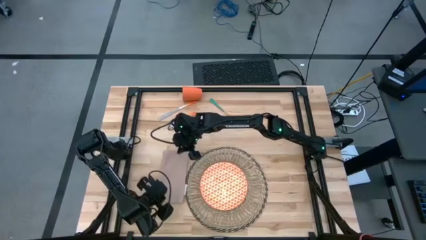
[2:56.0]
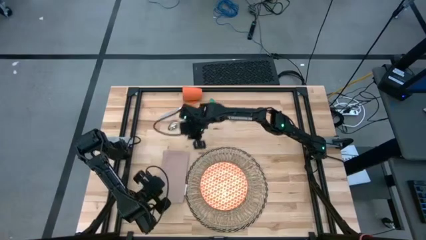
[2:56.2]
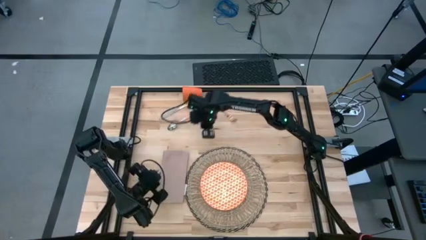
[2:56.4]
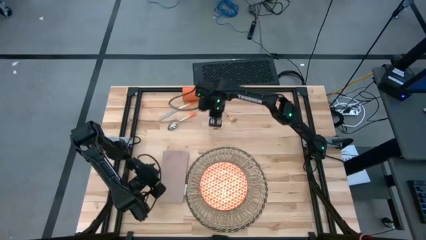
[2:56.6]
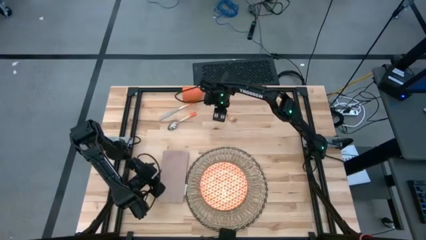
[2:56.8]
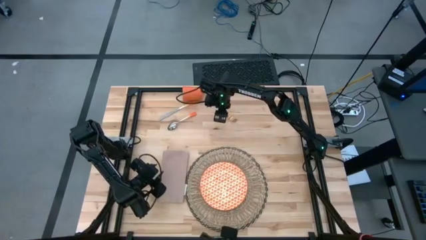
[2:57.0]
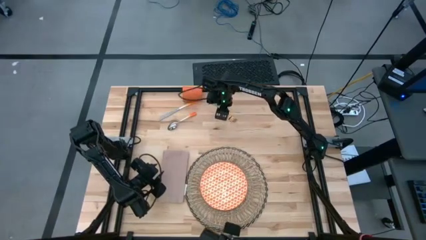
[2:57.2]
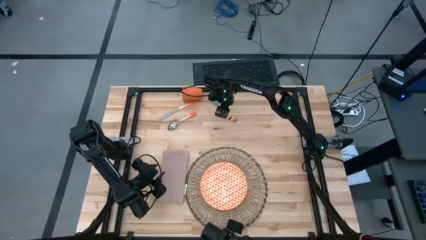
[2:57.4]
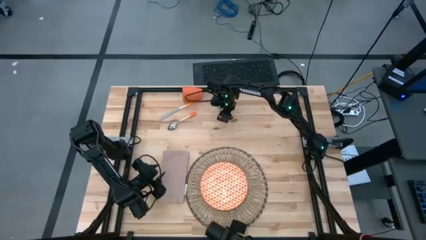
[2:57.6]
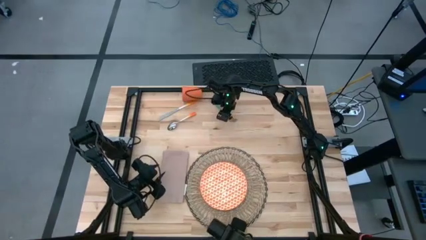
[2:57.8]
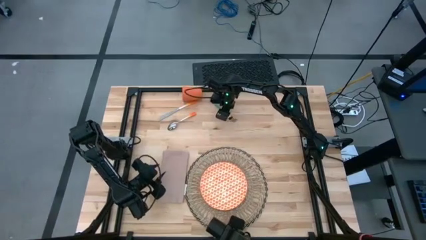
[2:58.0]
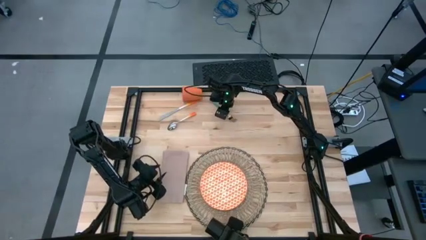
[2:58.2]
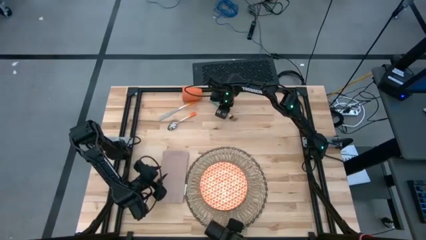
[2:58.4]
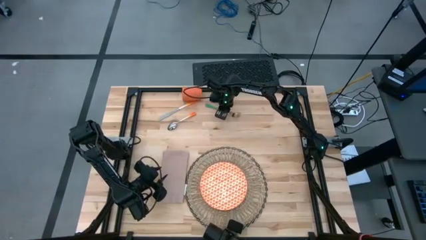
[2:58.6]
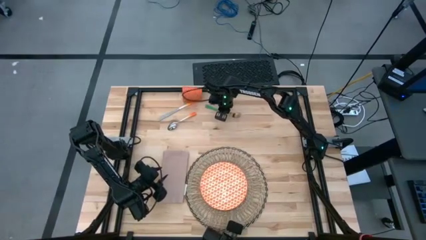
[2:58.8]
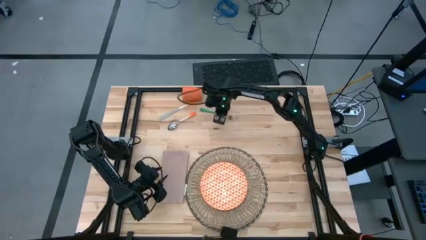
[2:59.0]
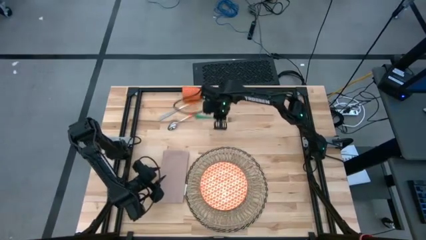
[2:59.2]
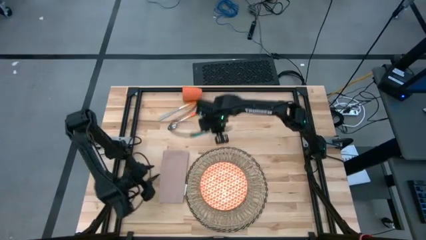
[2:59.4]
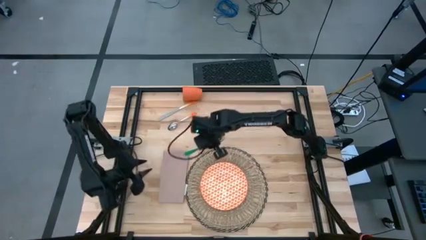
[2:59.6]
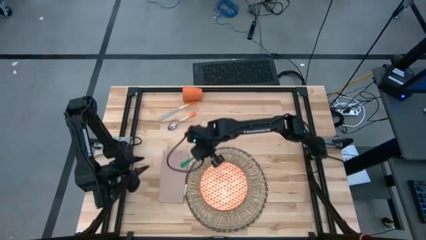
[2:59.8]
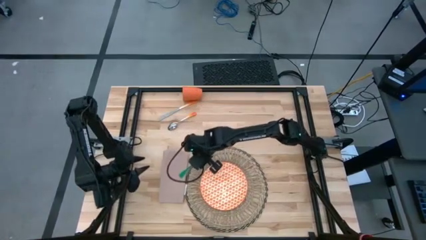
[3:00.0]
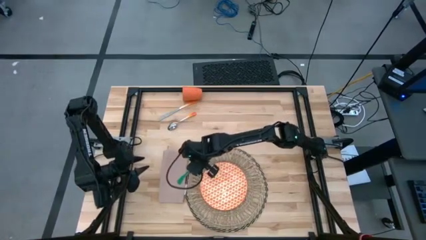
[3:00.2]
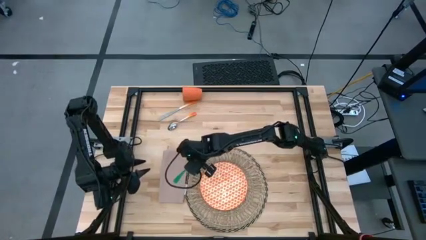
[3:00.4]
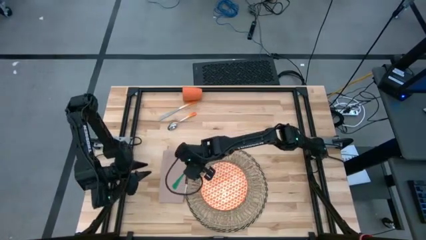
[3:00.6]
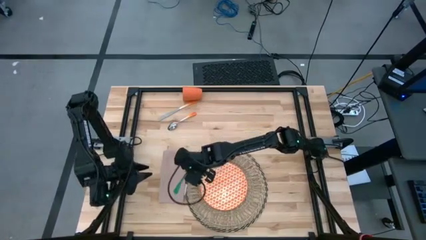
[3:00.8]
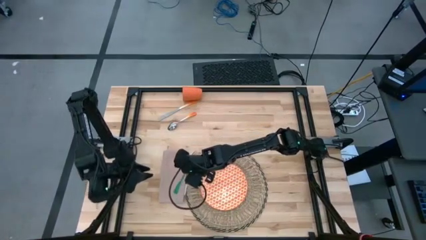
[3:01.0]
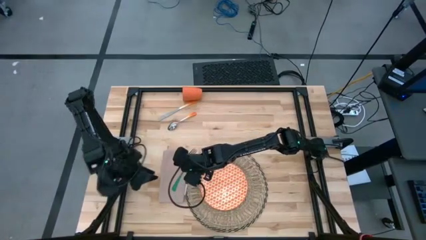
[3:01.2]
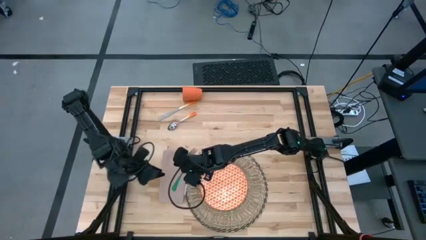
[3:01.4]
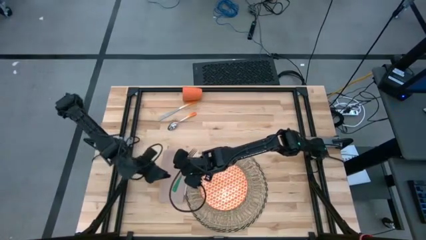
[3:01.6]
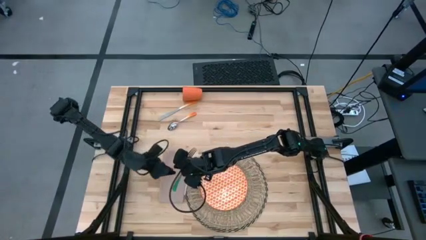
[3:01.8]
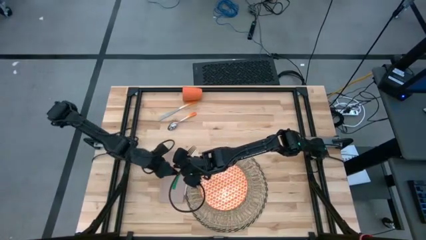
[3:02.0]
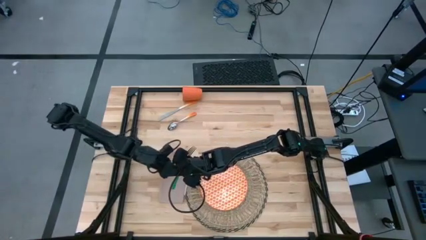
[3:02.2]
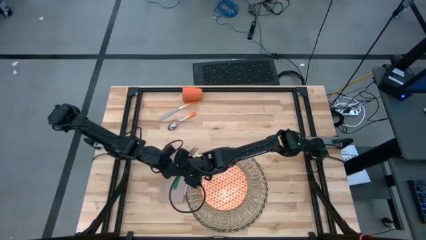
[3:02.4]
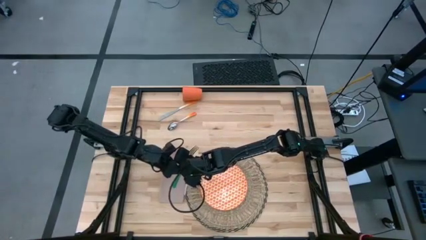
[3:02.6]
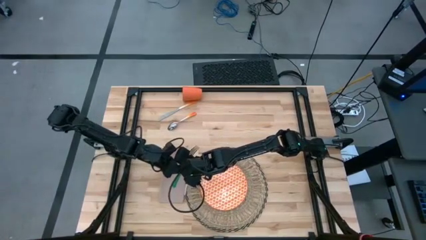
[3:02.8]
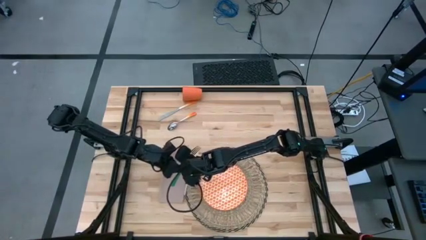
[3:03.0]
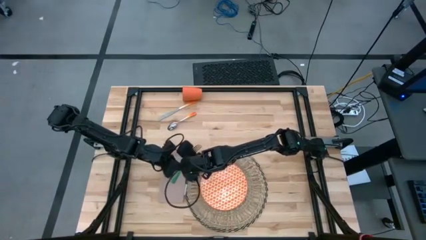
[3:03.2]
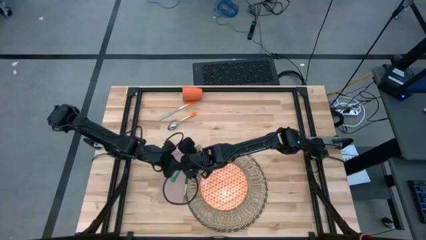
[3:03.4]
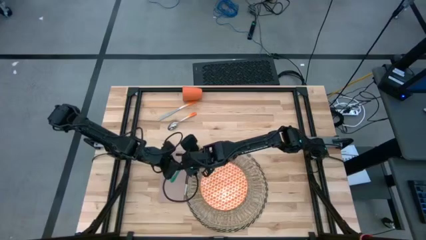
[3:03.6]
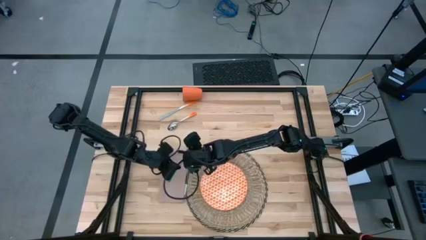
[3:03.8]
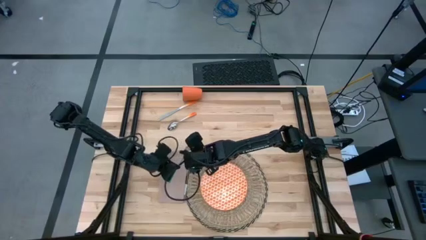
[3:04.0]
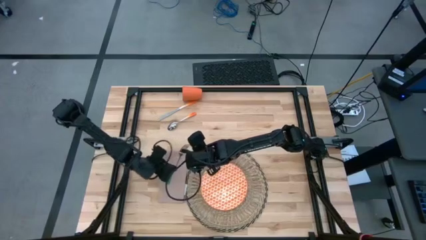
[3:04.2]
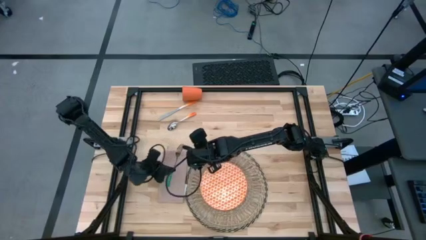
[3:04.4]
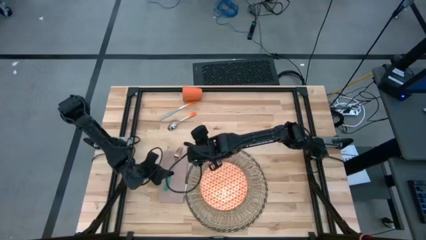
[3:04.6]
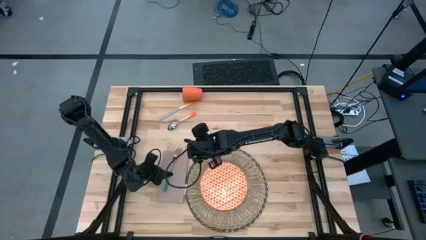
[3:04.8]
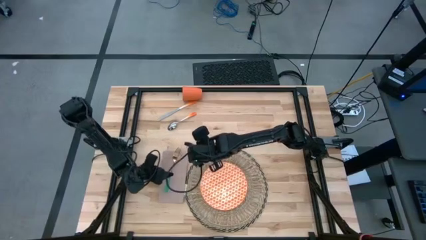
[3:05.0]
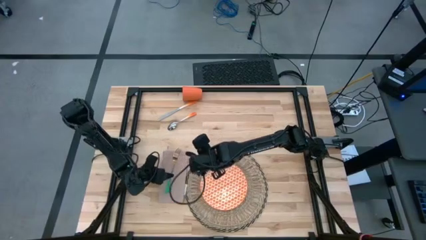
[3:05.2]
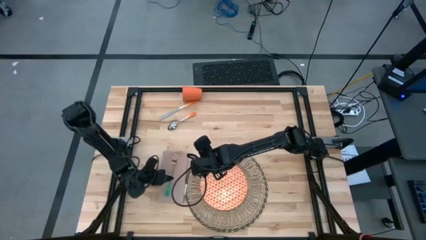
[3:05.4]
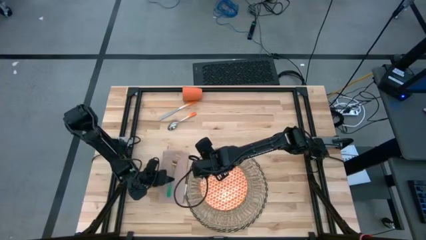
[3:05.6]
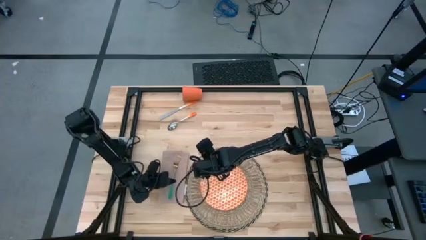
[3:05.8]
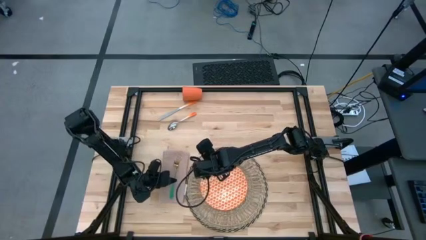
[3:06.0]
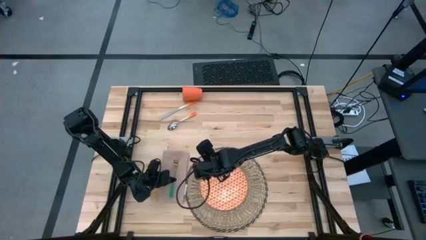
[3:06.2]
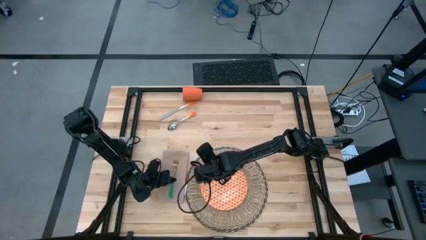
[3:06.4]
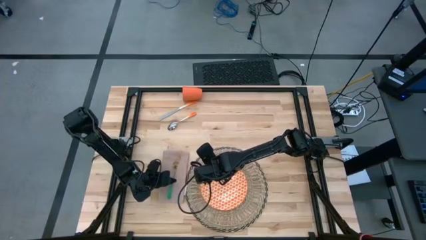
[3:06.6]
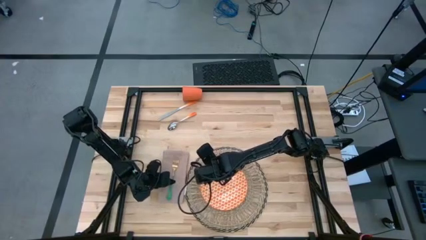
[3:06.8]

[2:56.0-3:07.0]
Task: Set table place
Put the fork on the napkin to the left of the mat

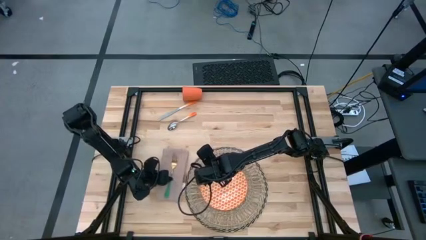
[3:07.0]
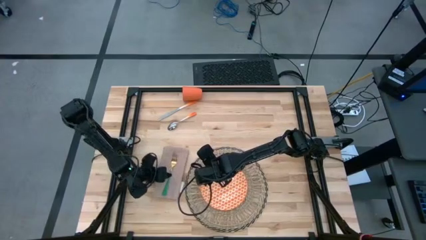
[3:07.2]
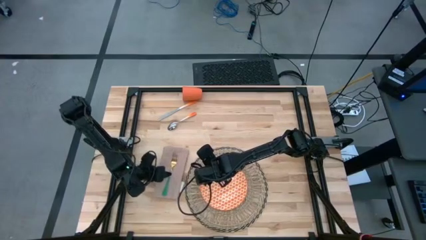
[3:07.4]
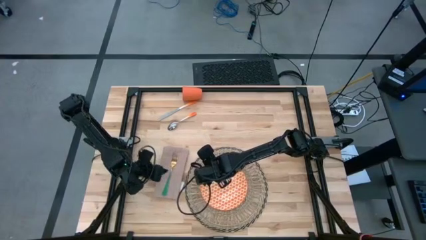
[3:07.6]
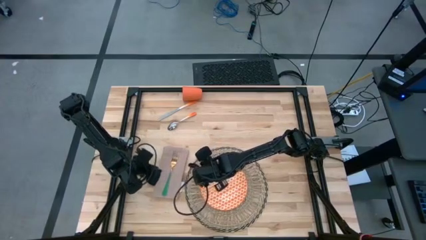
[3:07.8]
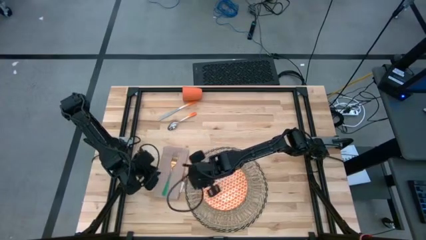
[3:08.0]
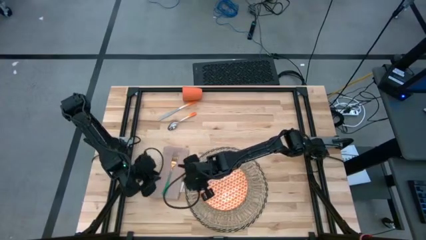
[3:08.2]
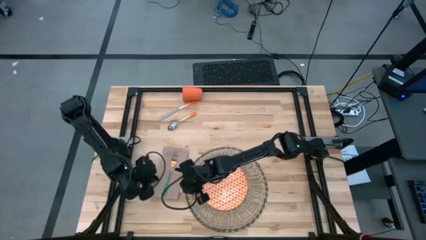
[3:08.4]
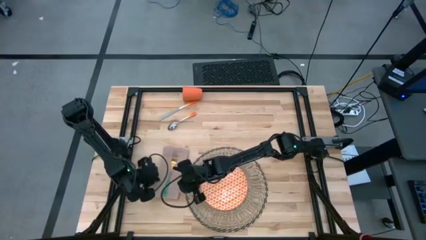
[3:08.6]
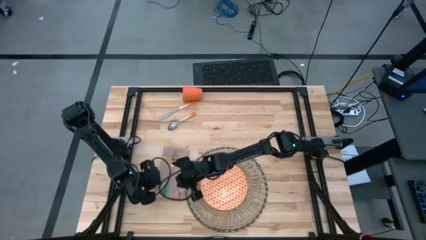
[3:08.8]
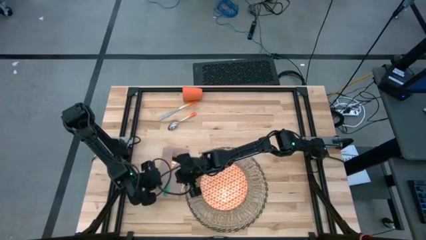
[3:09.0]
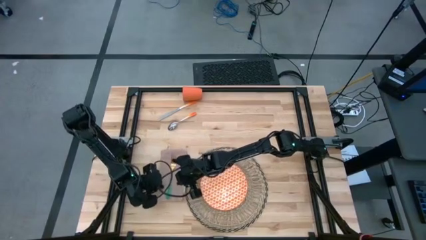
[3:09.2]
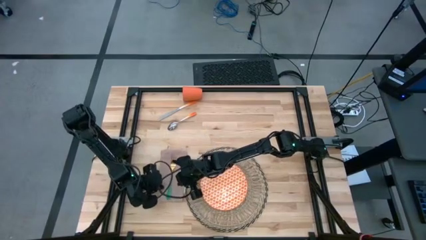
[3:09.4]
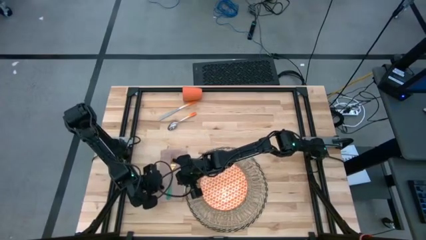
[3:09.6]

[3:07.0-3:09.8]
Adjust the napkin

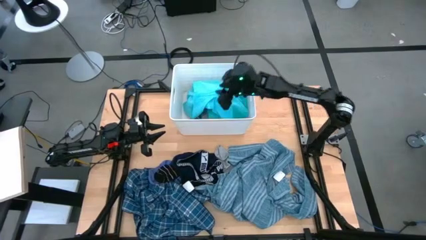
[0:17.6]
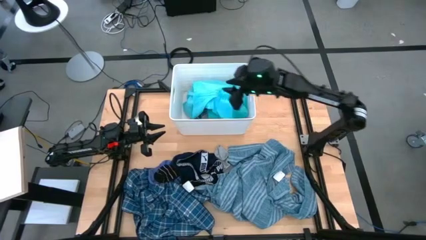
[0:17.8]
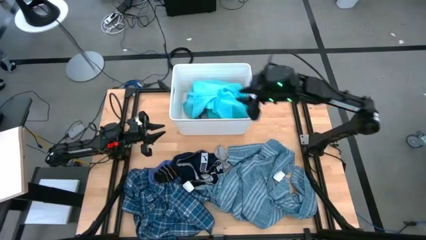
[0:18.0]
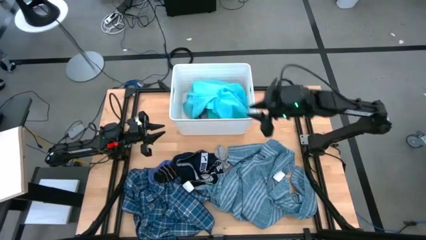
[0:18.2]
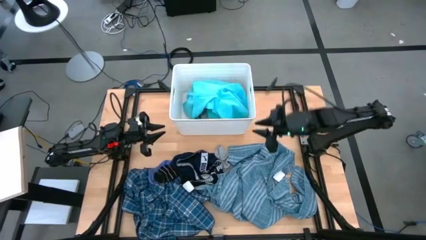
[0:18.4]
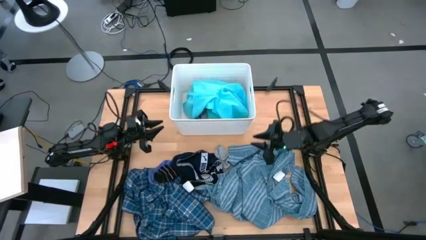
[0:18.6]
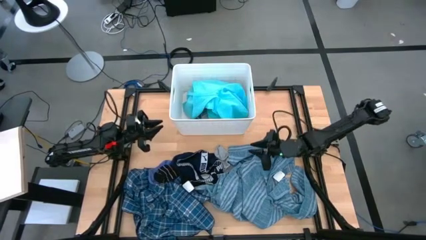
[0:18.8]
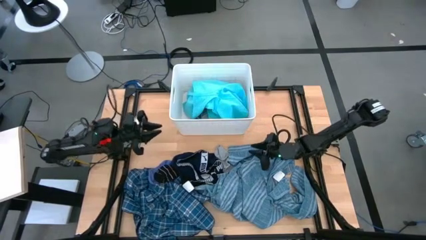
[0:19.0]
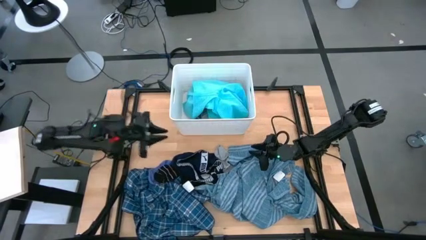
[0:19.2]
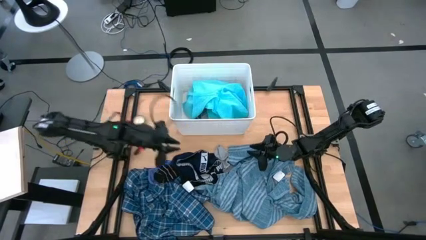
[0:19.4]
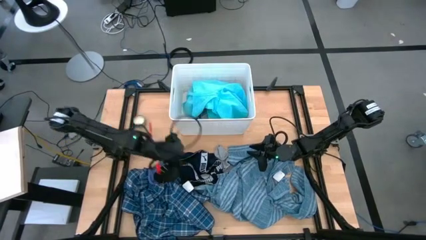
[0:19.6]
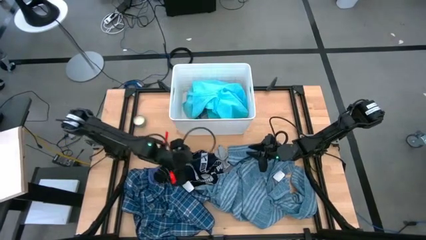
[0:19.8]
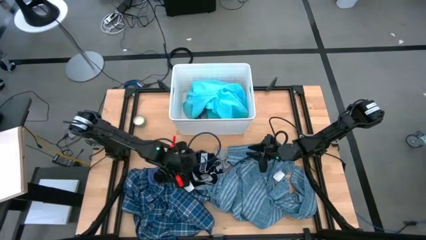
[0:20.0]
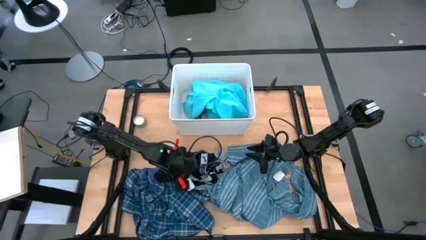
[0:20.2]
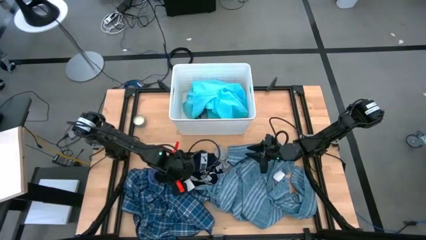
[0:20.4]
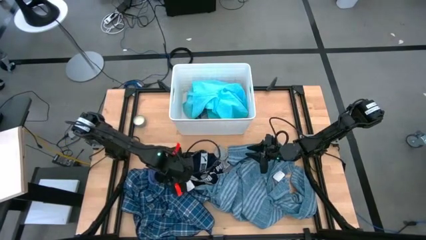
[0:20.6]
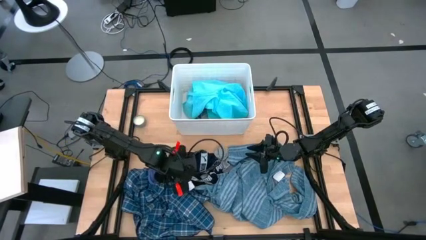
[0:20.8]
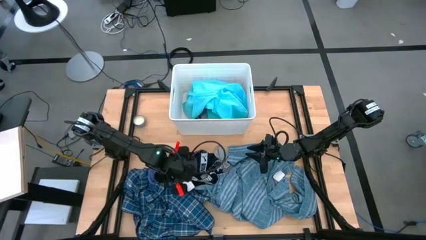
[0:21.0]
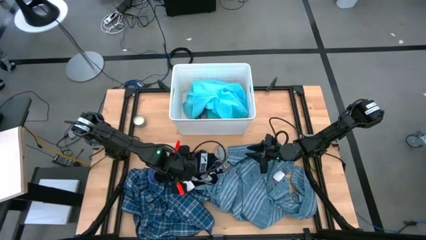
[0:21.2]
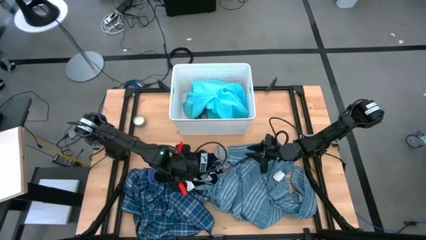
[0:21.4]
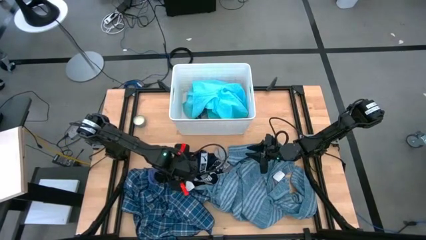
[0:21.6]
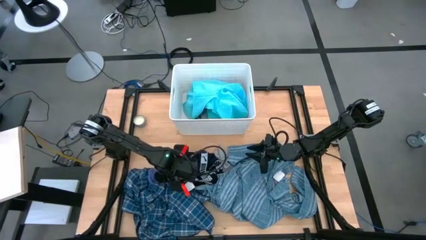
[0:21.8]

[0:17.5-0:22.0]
Task: Sort clothes
Put the black boxer into the white bin
